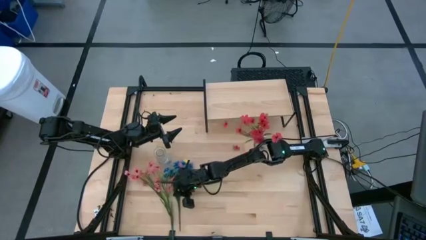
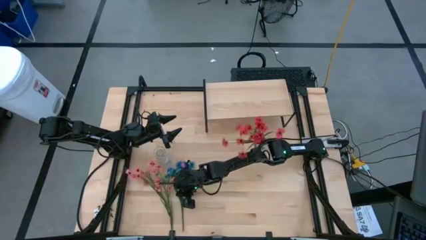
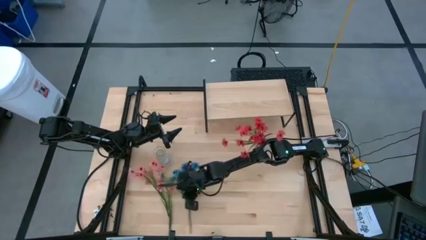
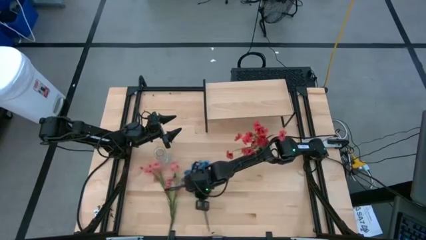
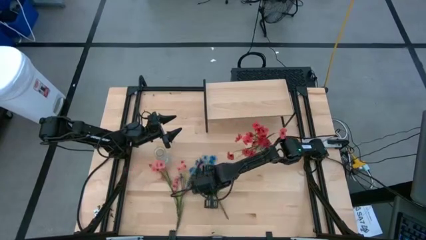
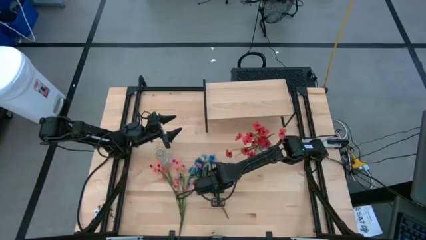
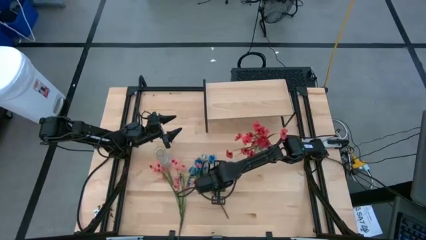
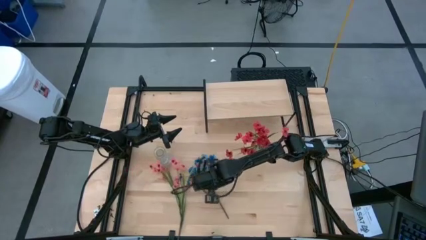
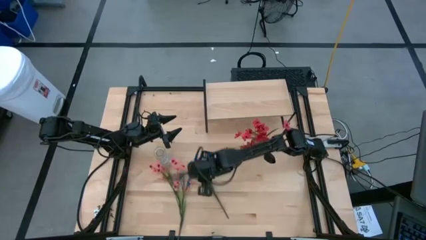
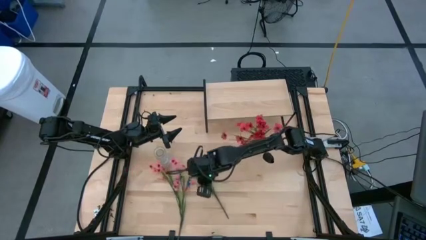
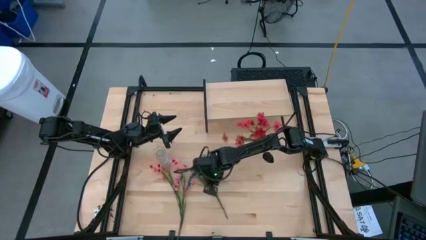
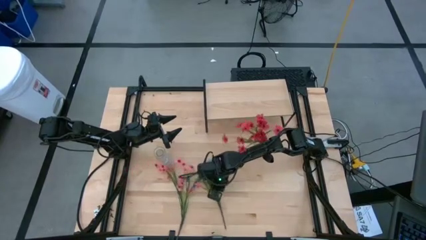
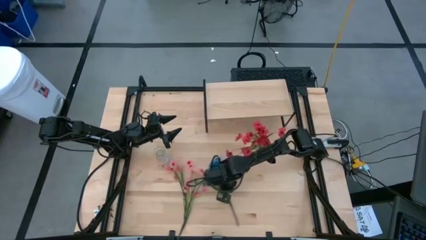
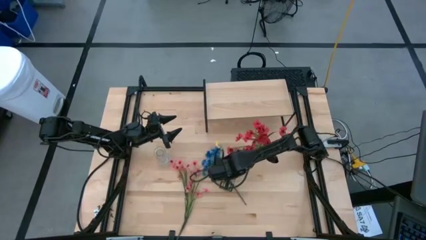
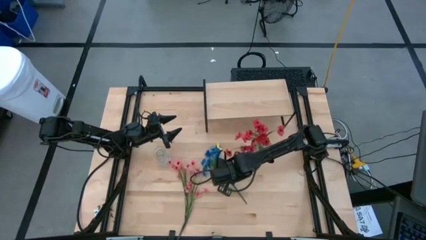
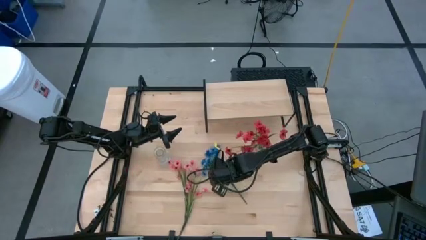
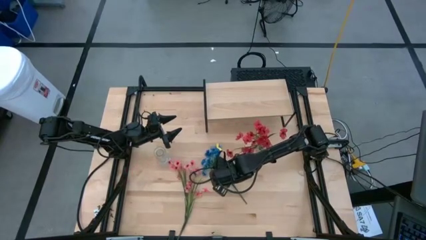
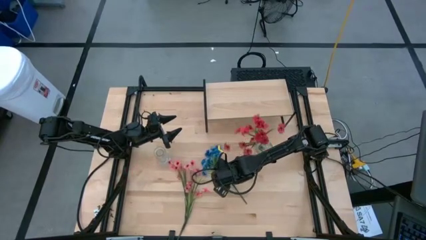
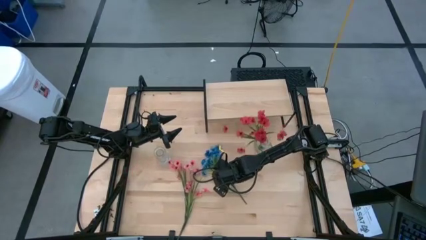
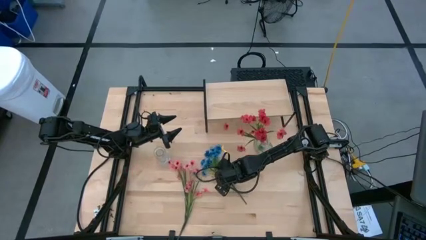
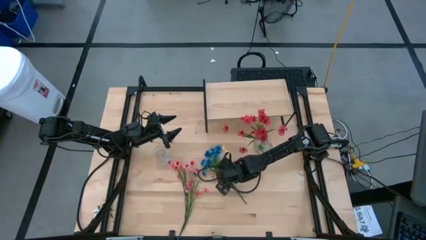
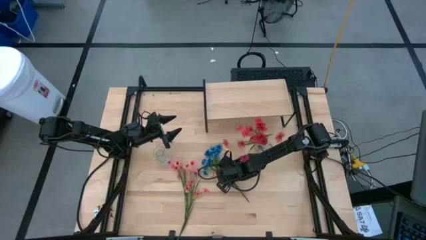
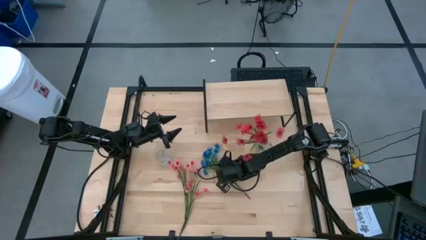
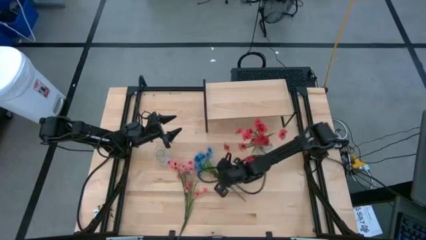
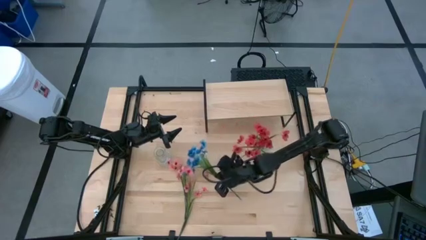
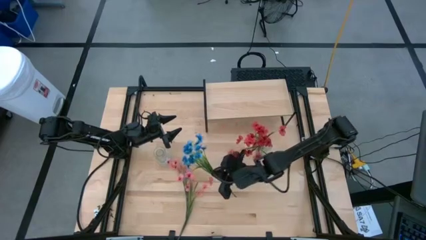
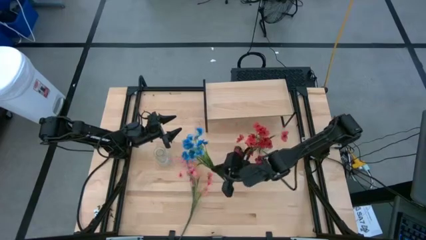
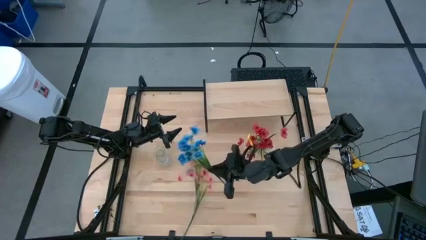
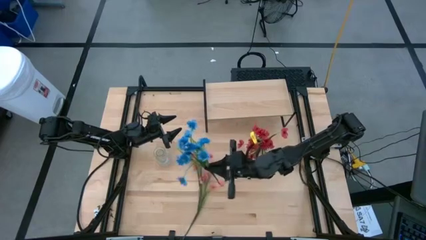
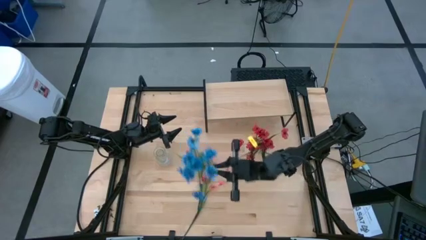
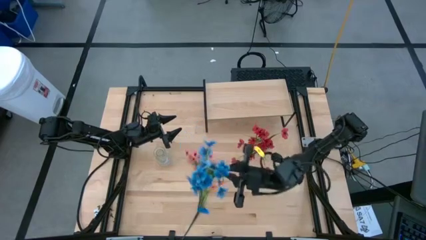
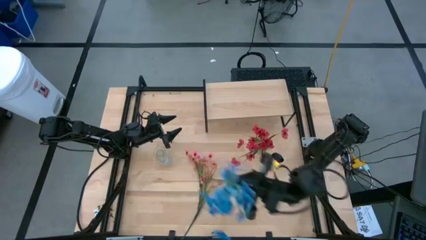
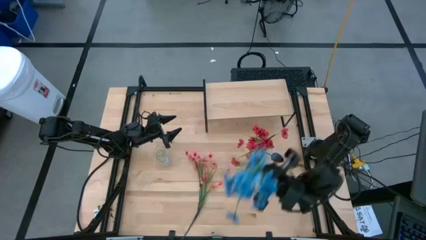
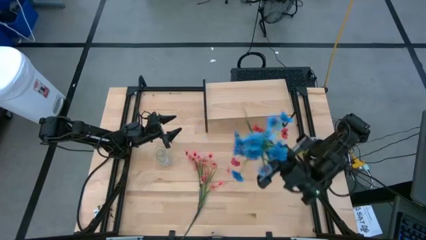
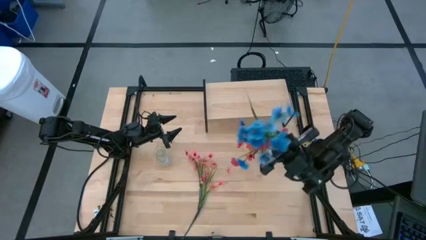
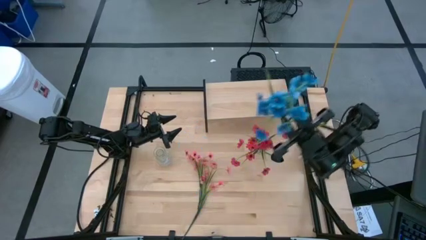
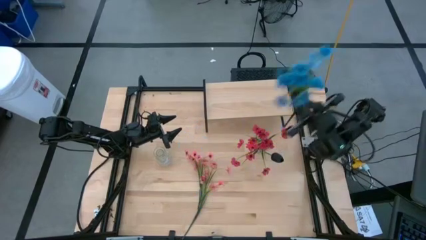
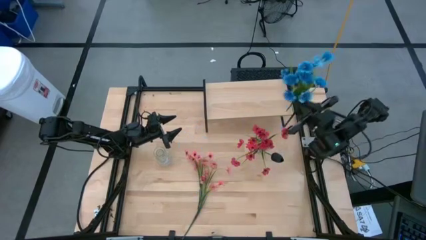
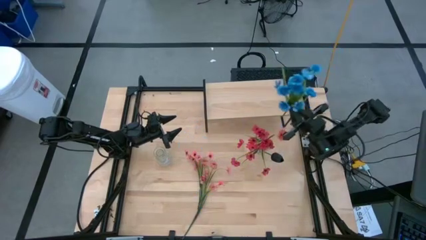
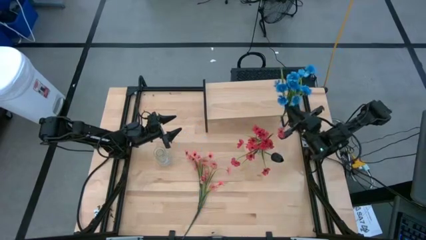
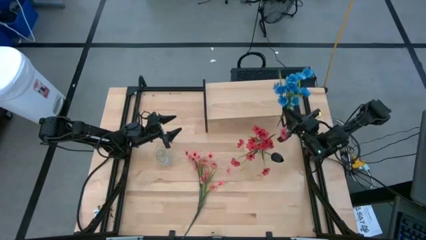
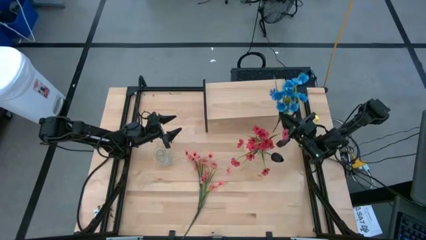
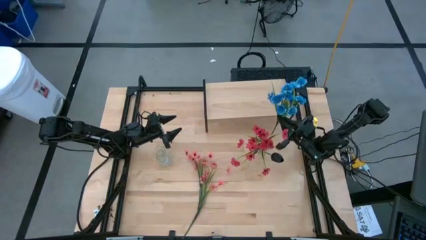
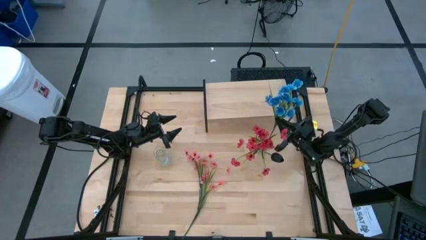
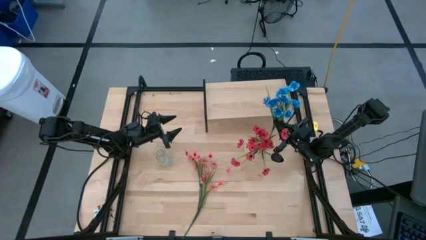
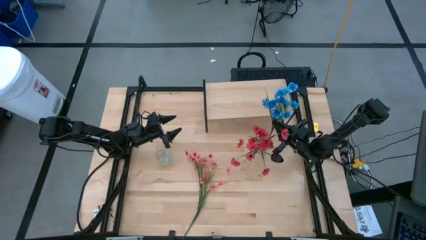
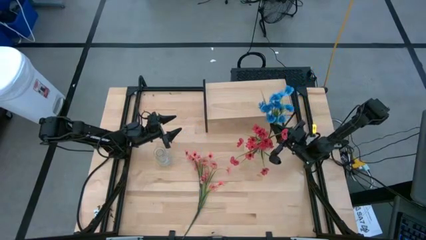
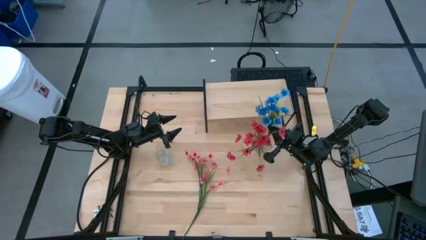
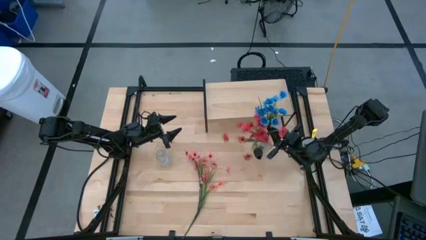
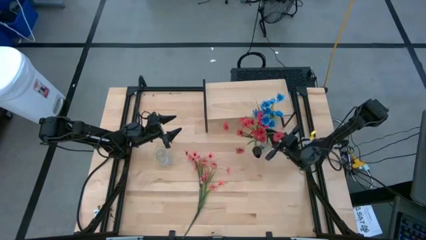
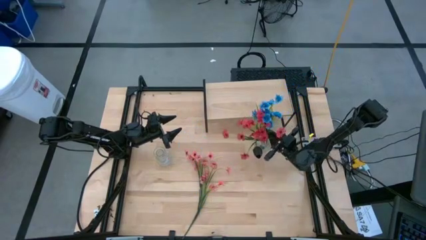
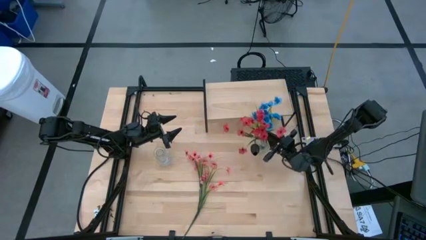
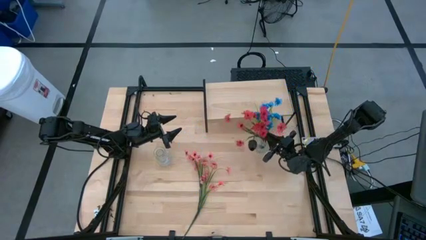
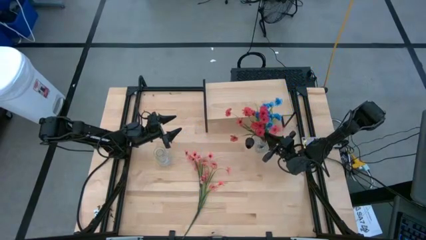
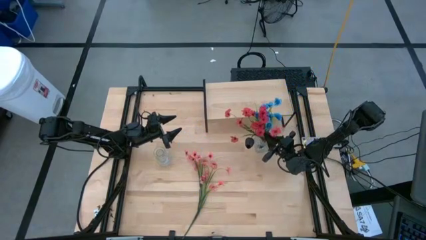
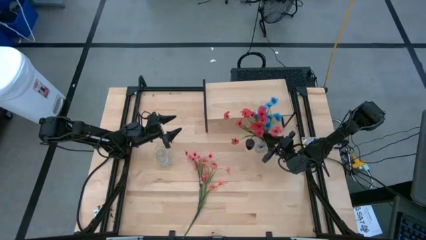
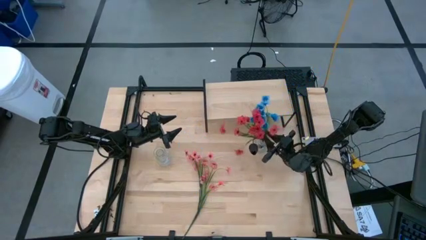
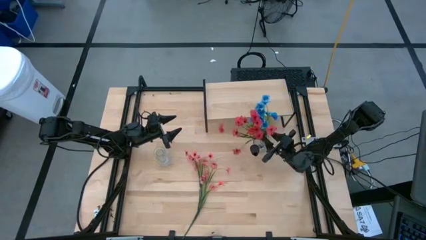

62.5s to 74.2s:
Task: Pick and place flowers into a vace then onto a shelf
Put the blue flowers into the right transparent vase

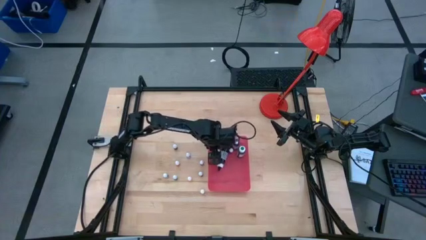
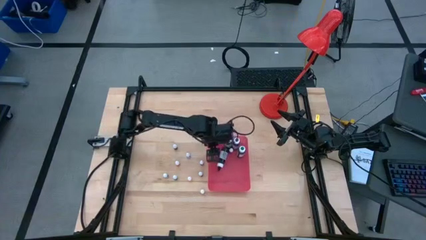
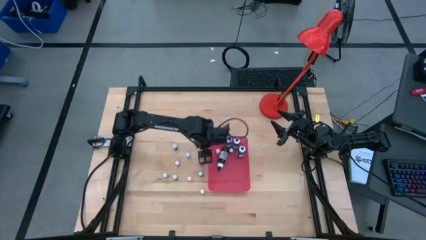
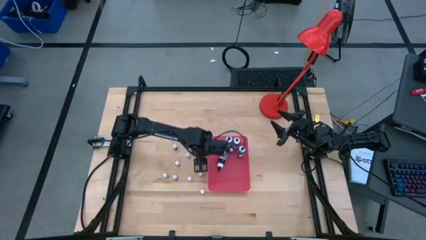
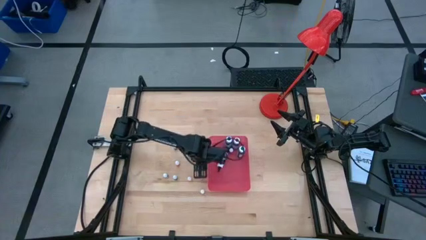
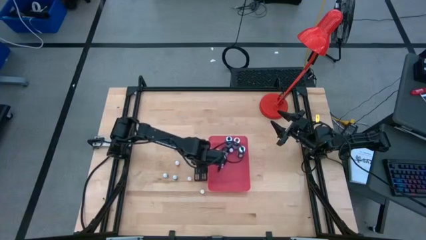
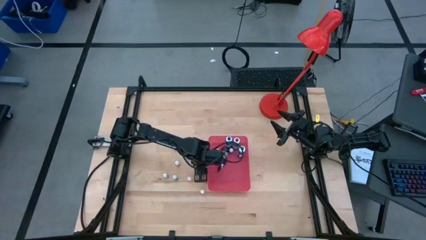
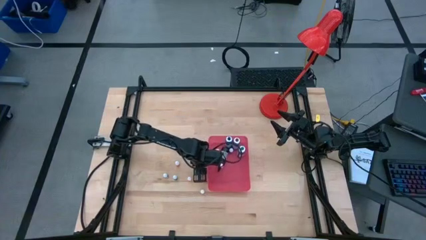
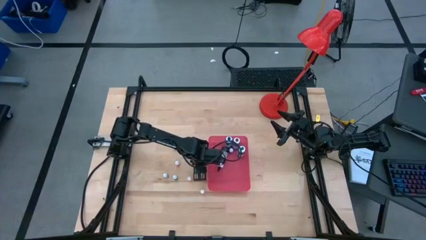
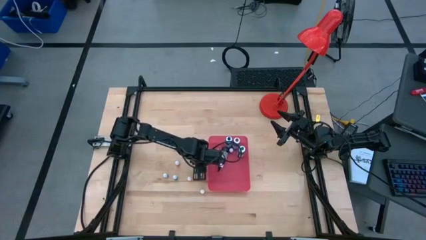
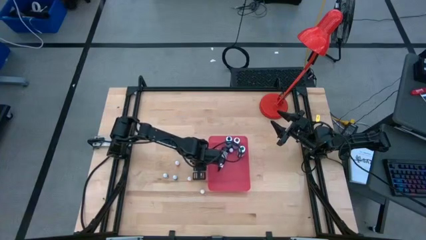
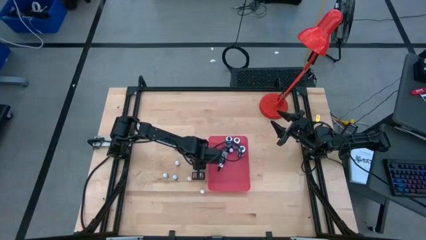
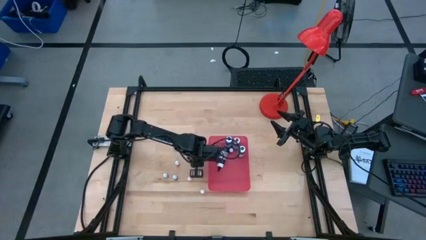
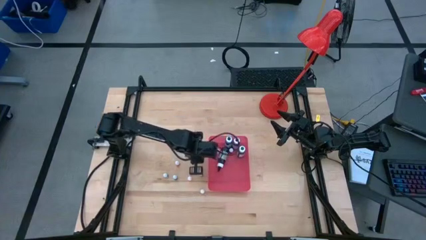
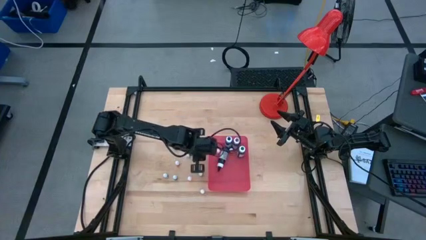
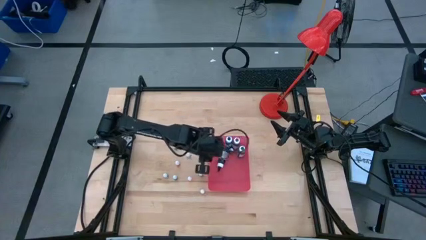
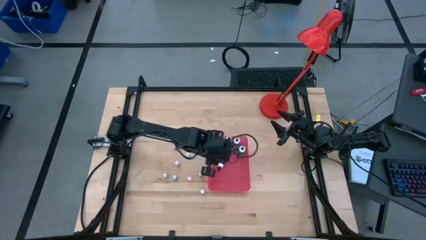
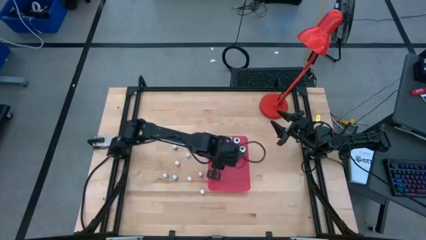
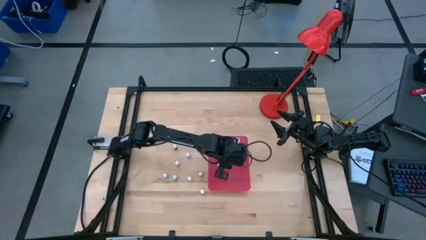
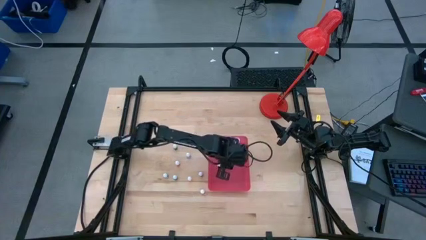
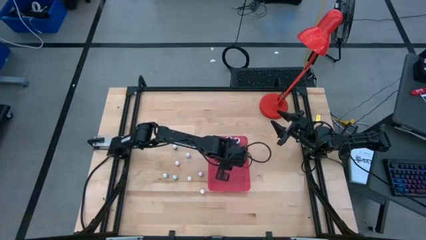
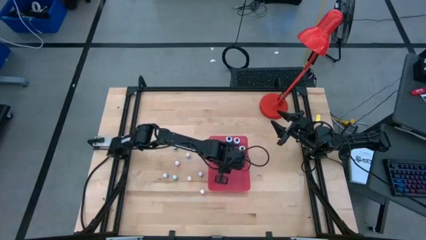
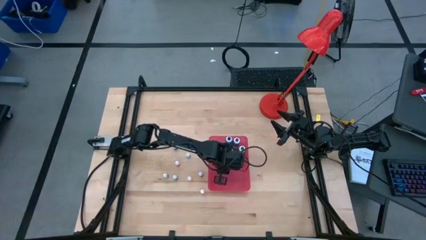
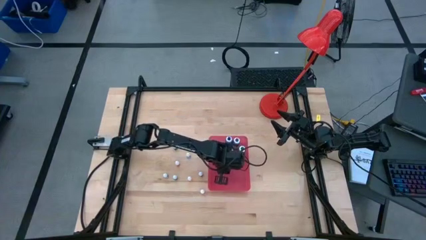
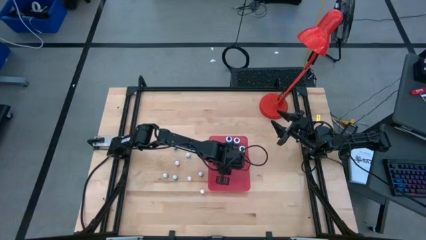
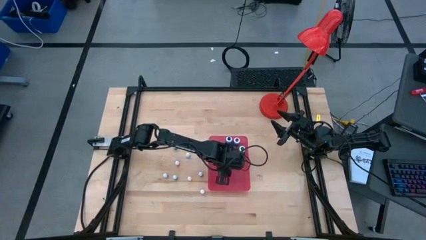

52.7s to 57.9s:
Task: Pick & Place food coloring
Put the small orange food coloring bottle into the red bin
